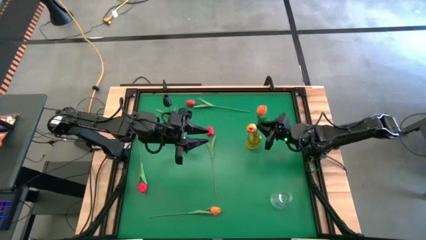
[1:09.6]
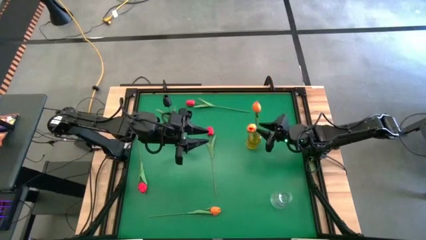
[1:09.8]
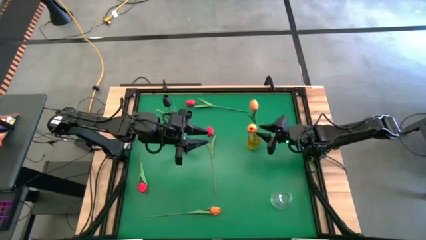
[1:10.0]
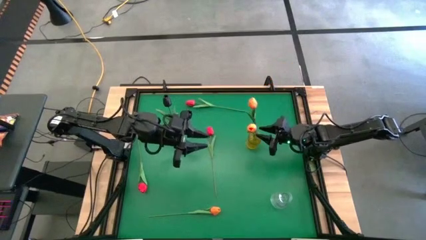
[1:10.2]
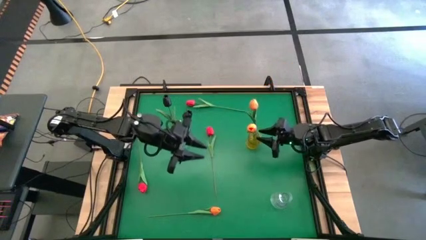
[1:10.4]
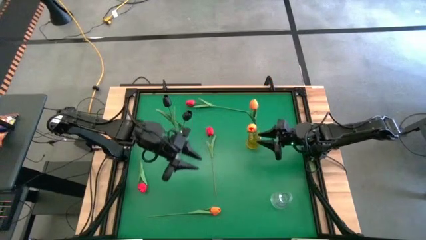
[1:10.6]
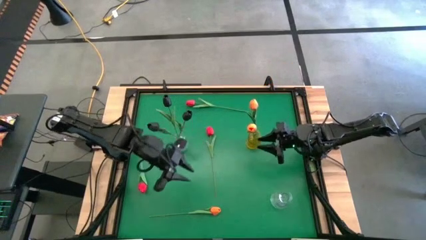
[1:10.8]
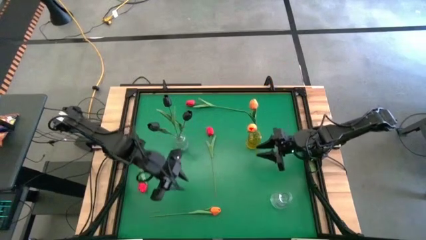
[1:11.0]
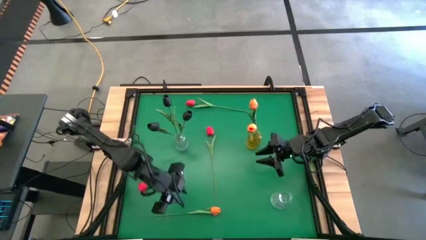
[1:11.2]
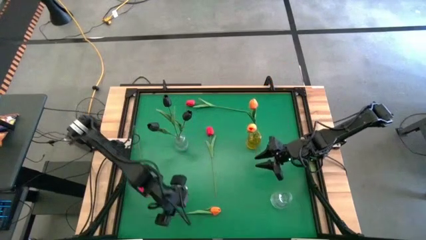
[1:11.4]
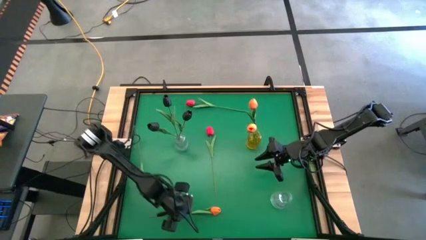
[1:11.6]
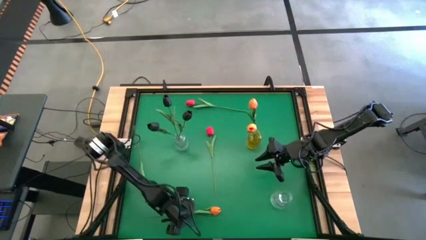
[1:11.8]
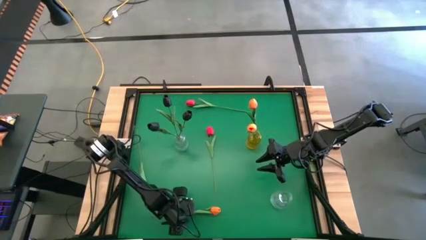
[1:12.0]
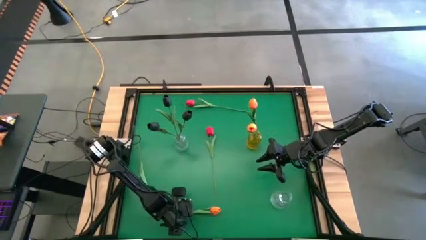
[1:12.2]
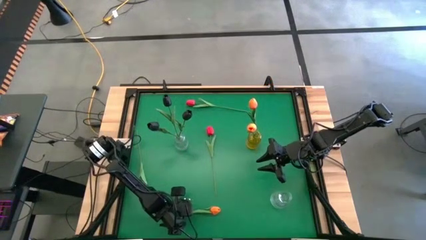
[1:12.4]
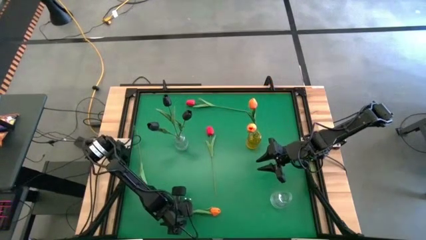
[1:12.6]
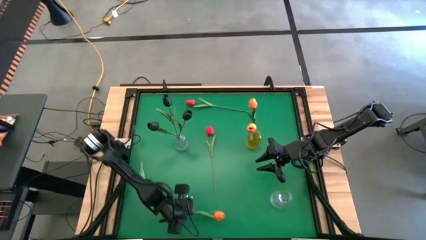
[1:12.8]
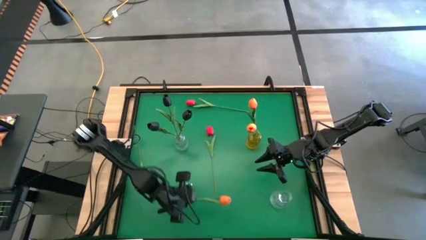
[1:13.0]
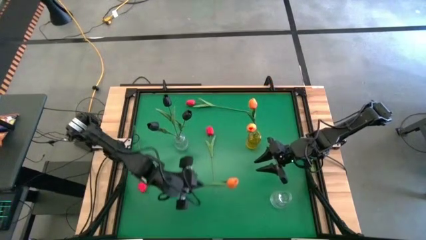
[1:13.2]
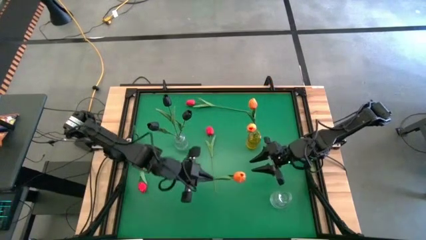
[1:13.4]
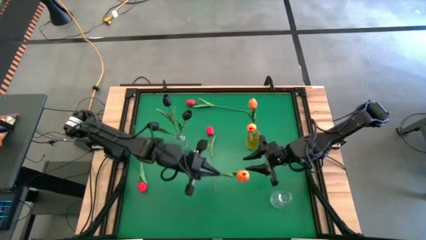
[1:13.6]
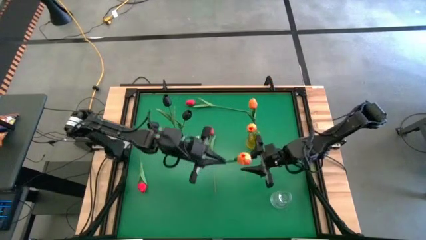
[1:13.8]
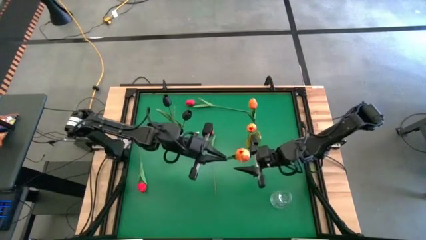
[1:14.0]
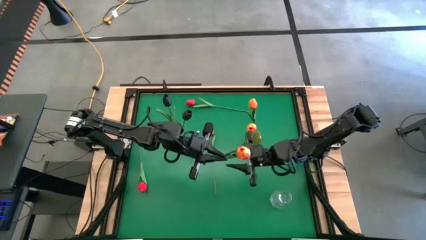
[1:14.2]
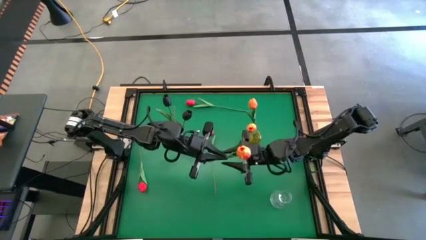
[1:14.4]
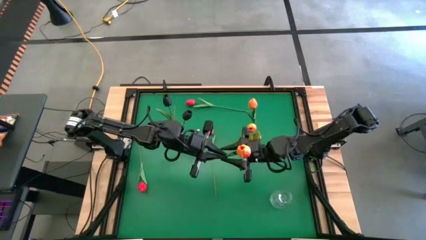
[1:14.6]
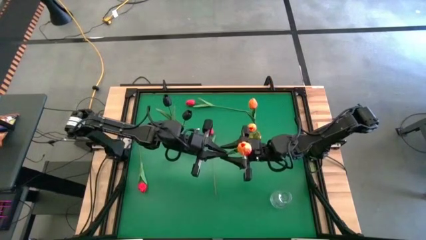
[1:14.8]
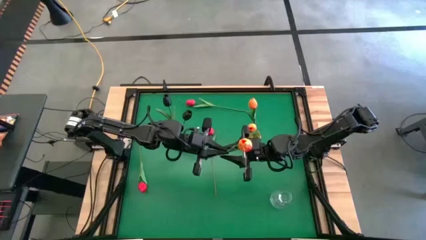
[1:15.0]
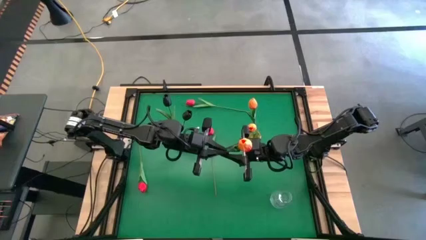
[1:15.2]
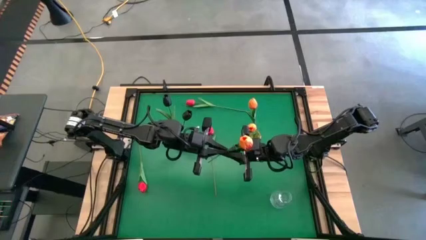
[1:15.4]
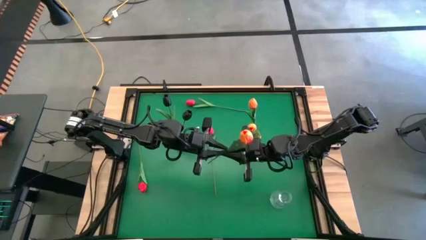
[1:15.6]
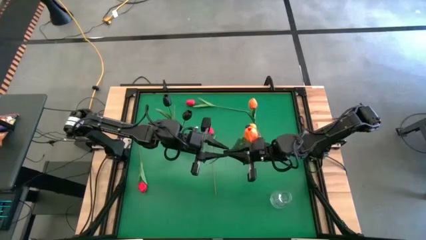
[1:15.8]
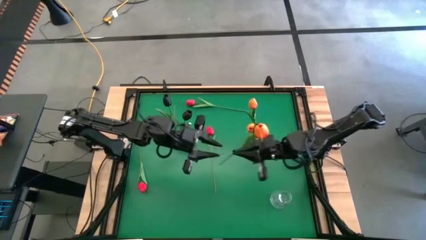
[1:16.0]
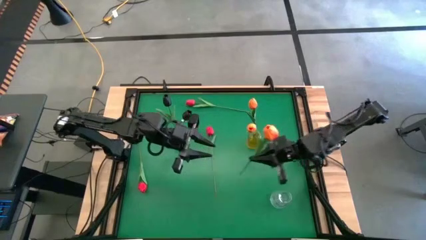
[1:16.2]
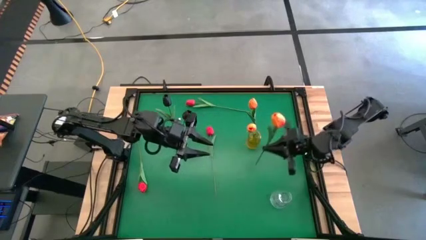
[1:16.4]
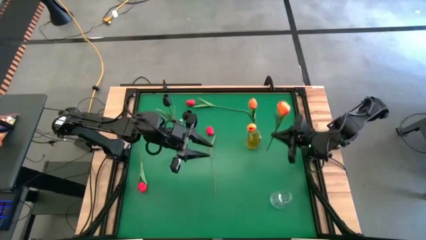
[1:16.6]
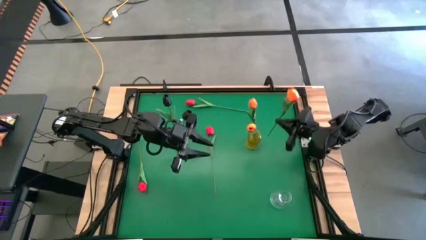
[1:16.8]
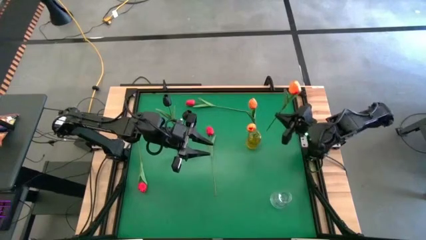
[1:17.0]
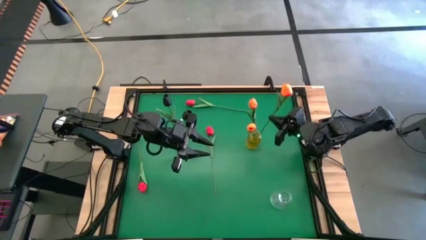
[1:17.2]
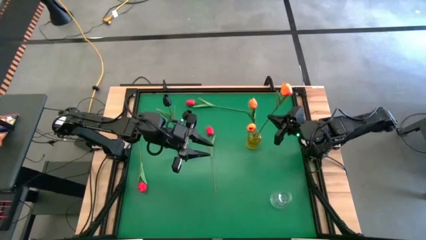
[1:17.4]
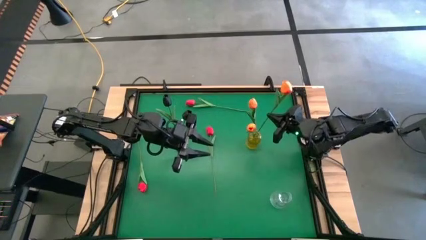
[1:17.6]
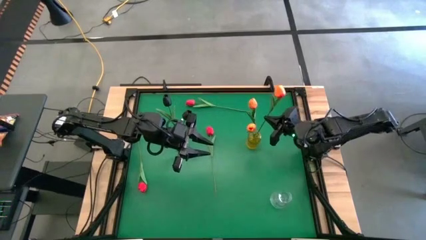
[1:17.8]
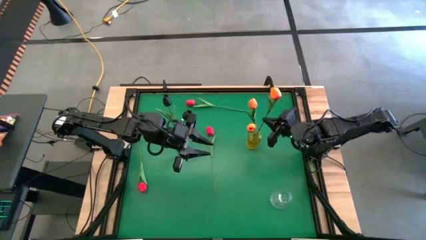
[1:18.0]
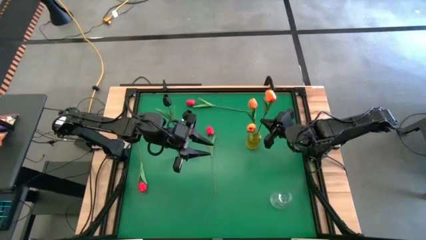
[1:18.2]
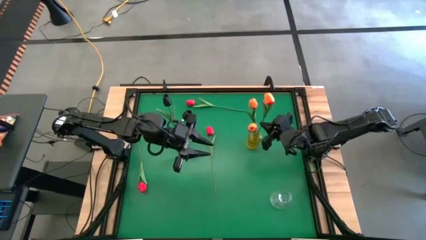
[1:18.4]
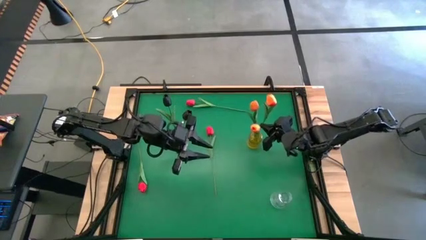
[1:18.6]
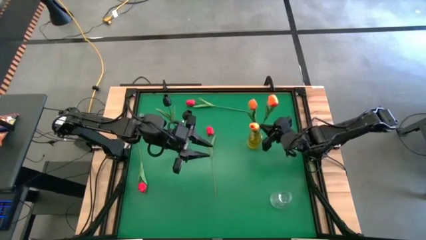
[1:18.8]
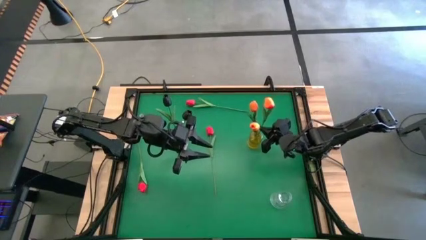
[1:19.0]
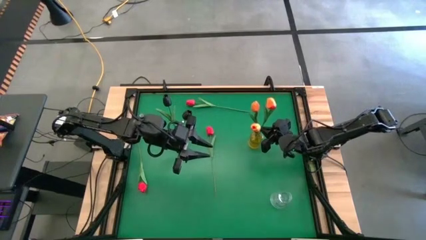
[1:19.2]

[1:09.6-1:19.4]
Task: Sort flowers into vase by color
Put the orange tulip into the yellow vase

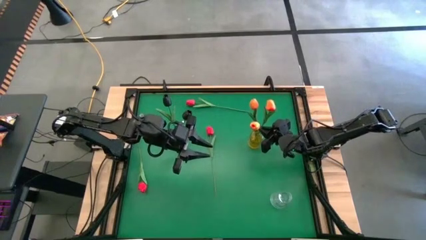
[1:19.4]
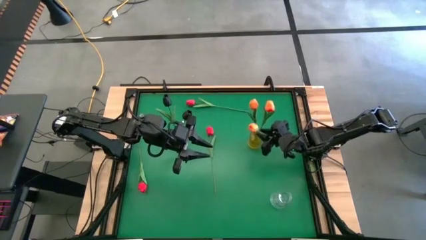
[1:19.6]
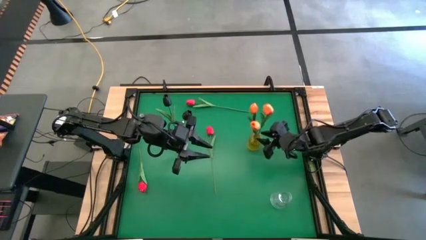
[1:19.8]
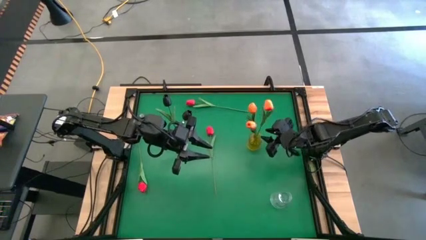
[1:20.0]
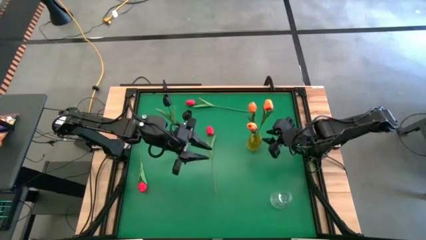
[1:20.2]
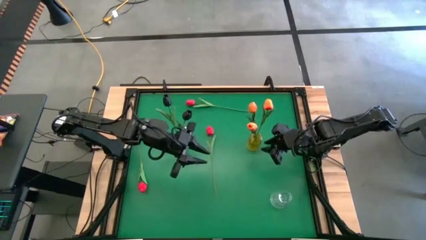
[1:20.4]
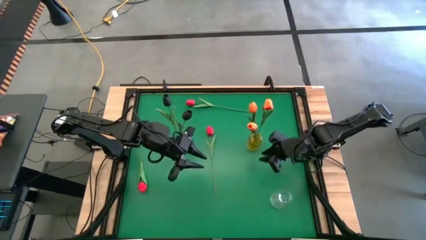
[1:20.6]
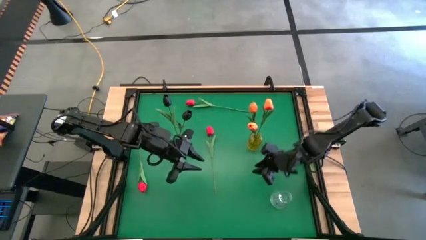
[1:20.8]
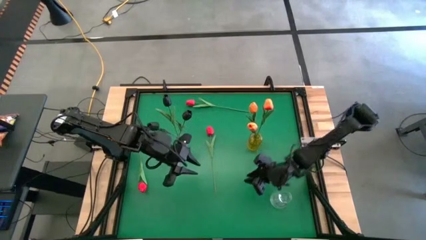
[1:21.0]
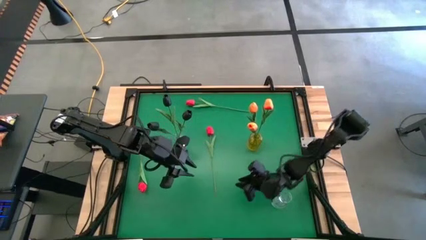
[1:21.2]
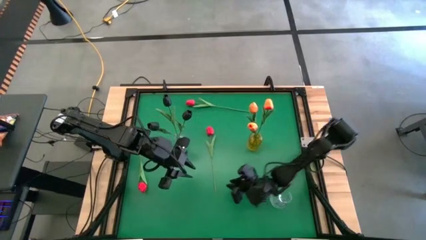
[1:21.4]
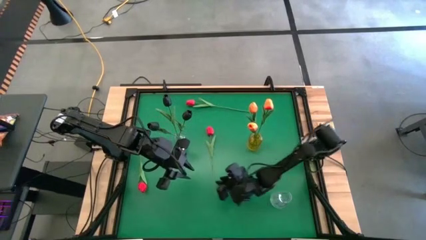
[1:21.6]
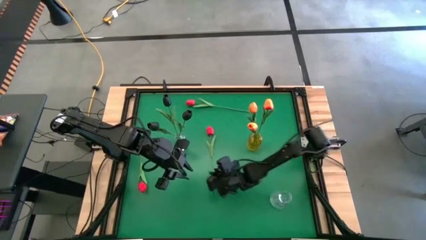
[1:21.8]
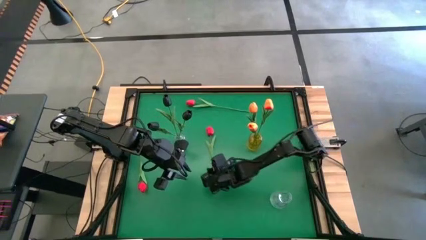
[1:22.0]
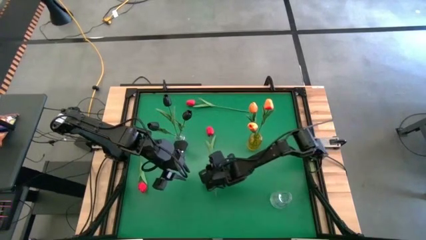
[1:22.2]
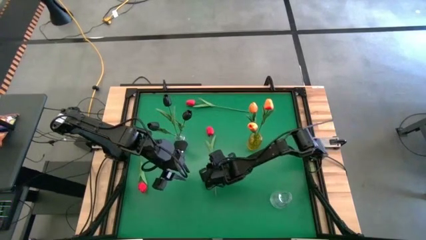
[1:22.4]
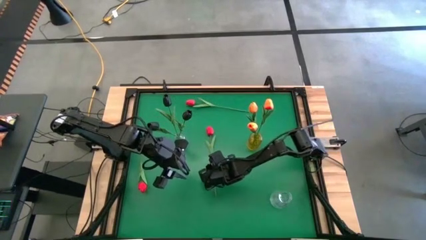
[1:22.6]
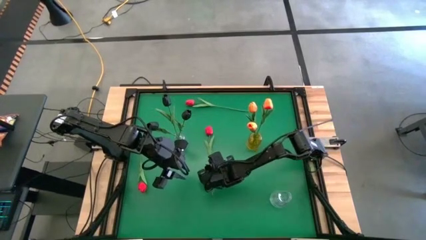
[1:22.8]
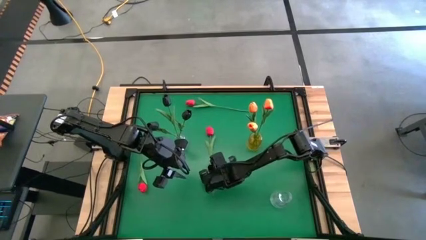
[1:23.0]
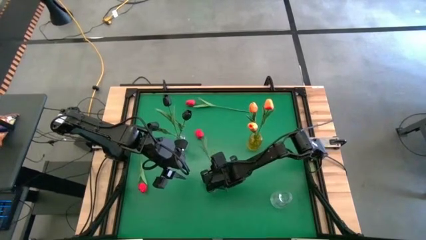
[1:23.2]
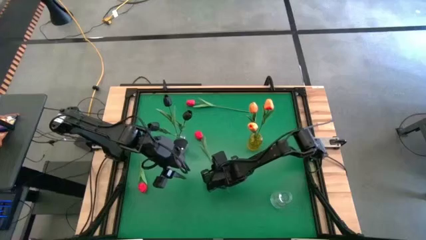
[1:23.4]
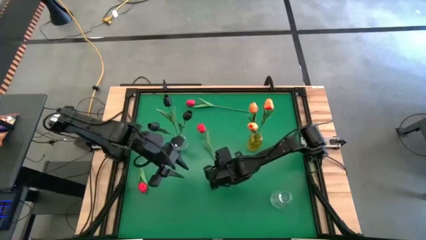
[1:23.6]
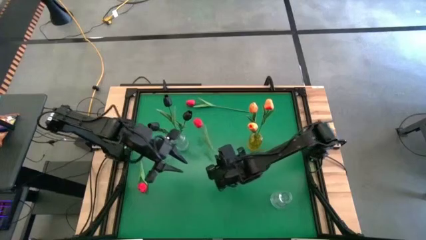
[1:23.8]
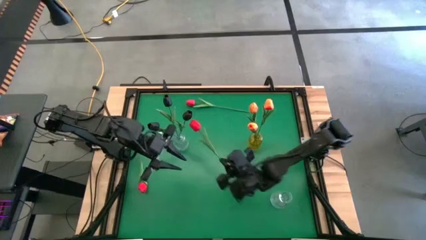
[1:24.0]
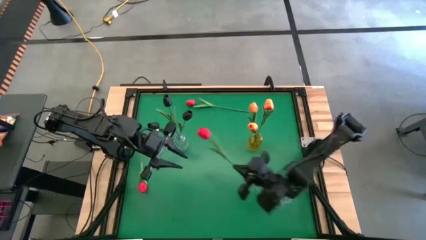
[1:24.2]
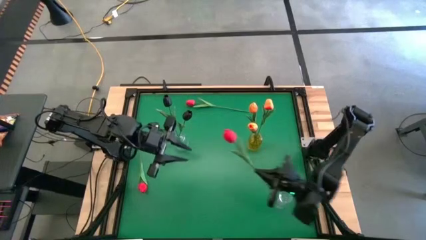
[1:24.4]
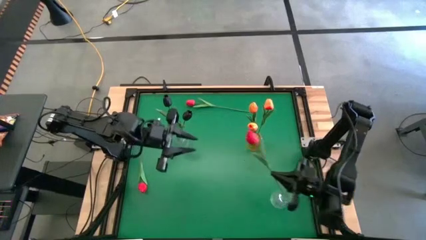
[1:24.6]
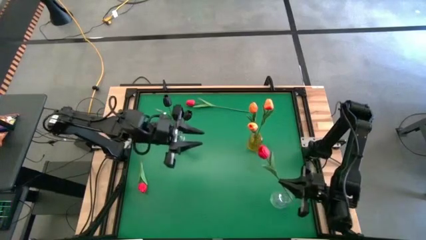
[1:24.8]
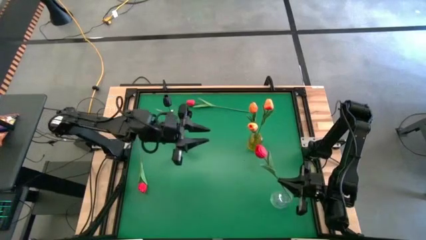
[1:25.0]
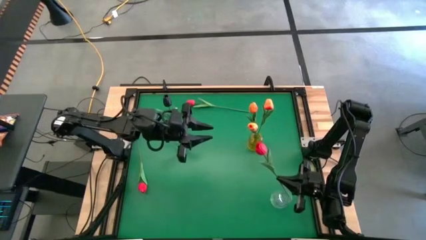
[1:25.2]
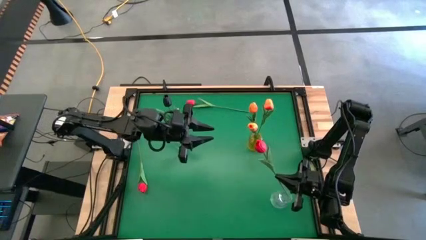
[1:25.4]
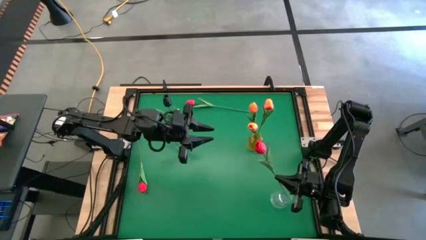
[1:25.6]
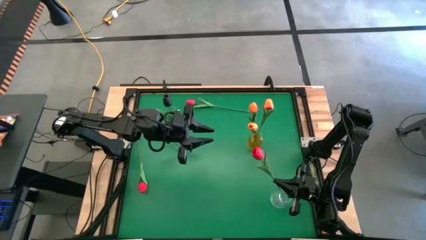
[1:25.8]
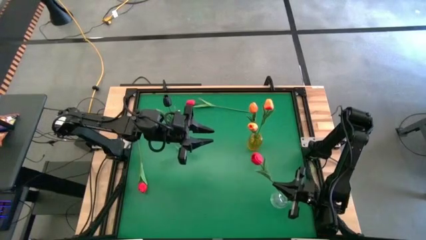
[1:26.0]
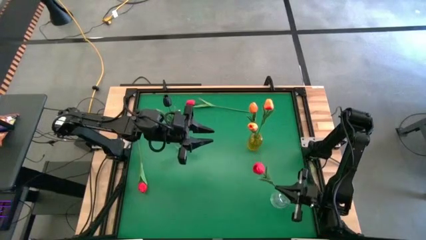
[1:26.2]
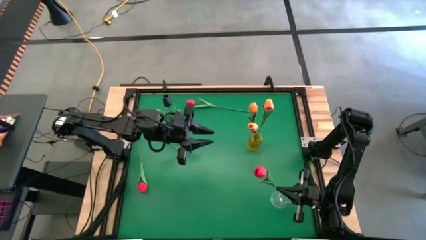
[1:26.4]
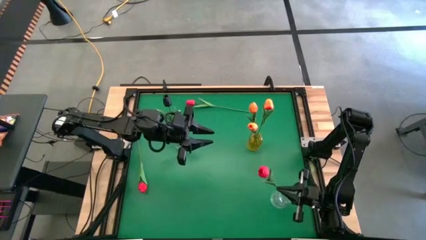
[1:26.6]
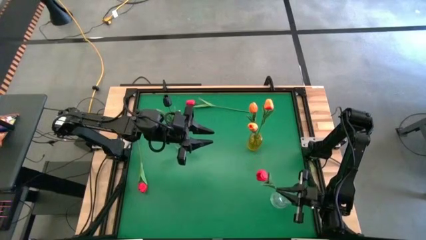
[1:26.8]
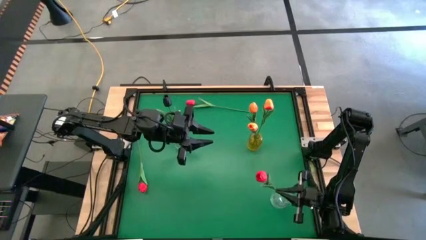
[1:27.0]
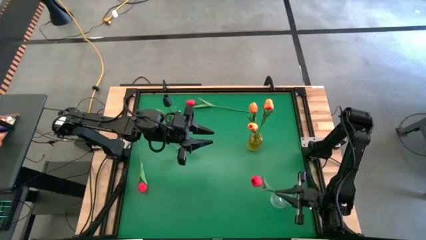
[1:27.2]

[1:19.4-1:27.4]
Put the center red tulip into the bottom transparent vase
